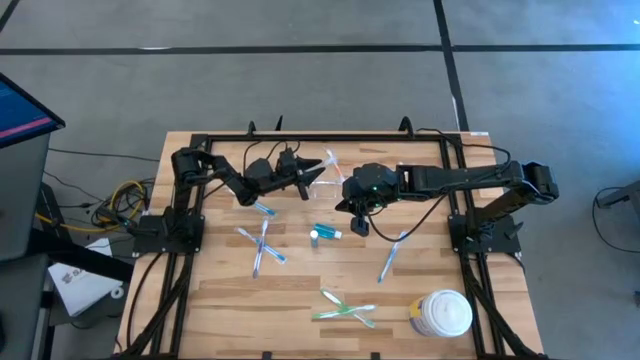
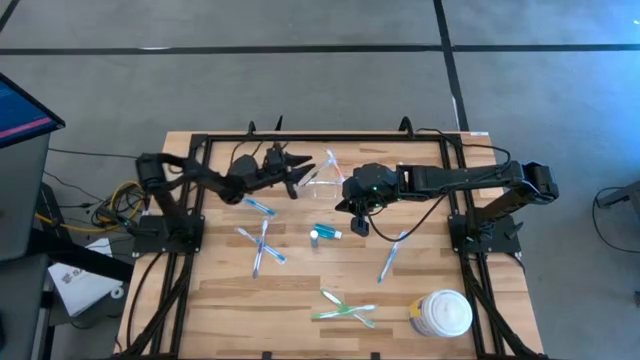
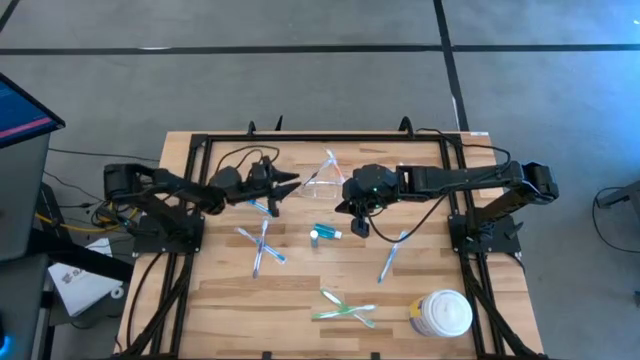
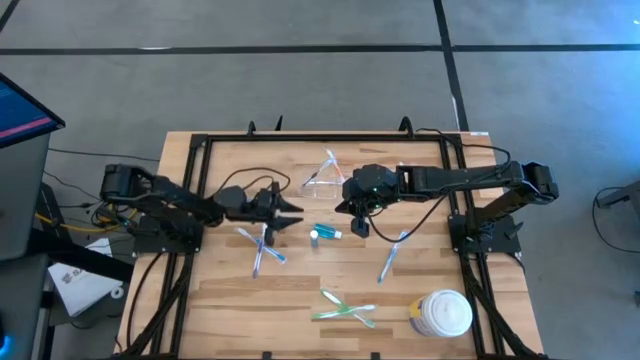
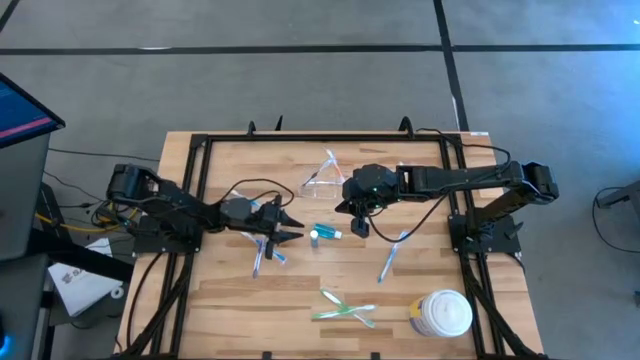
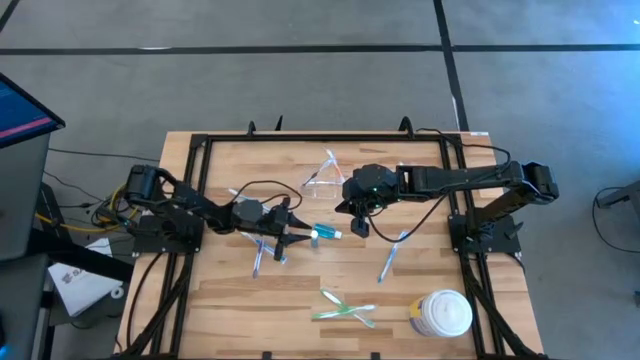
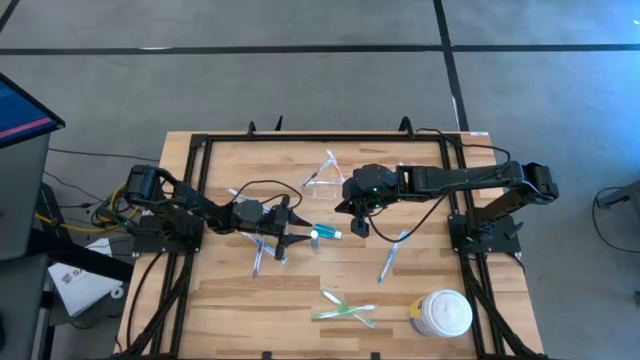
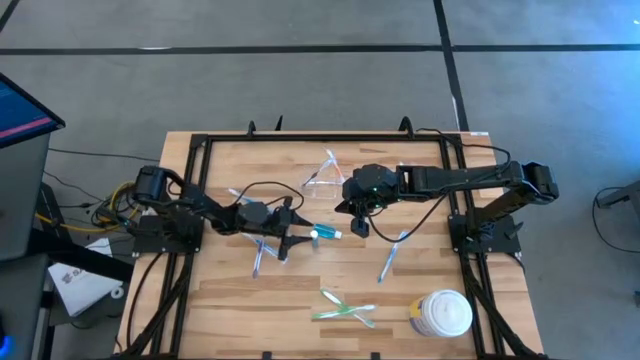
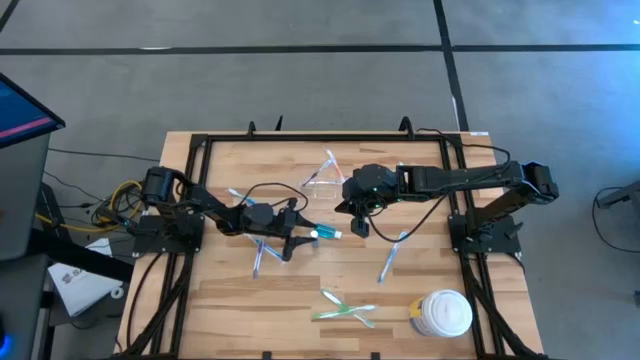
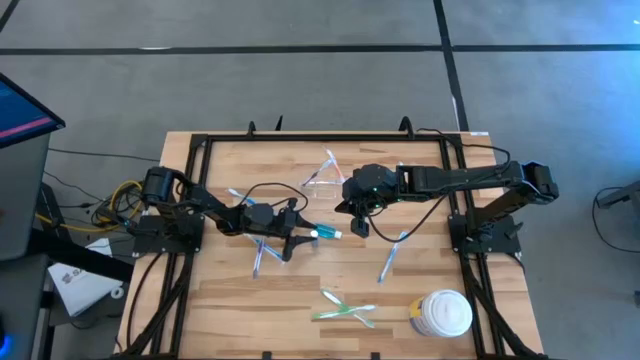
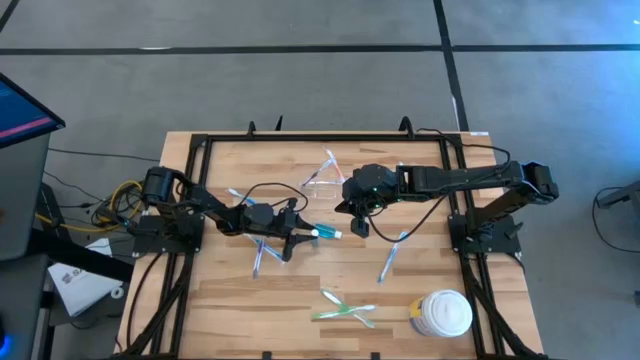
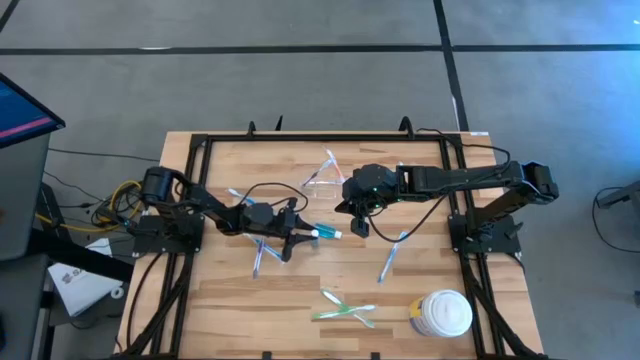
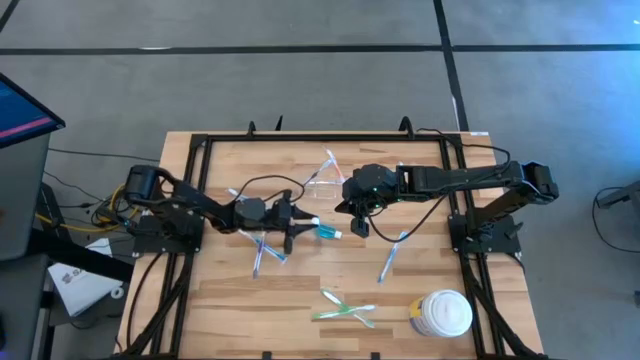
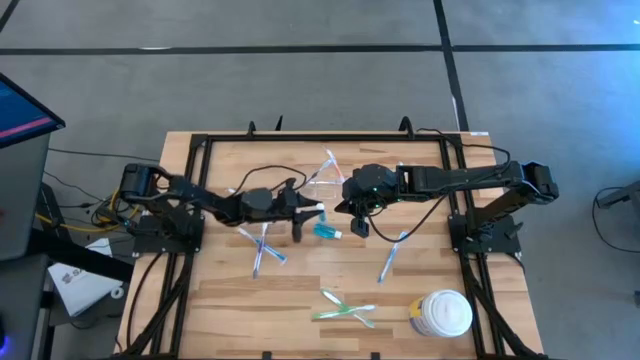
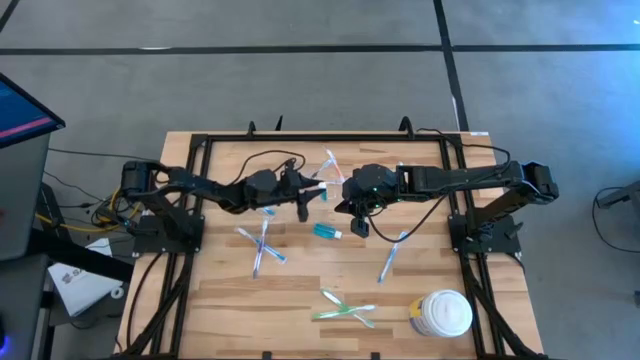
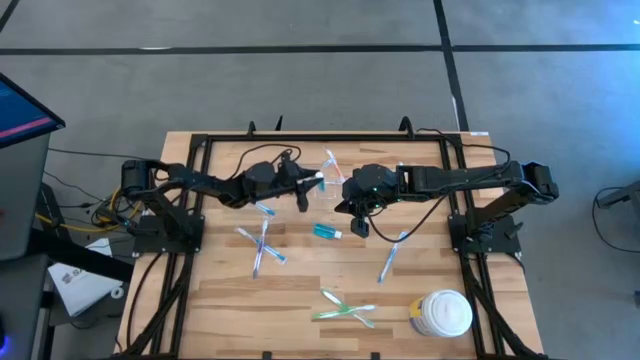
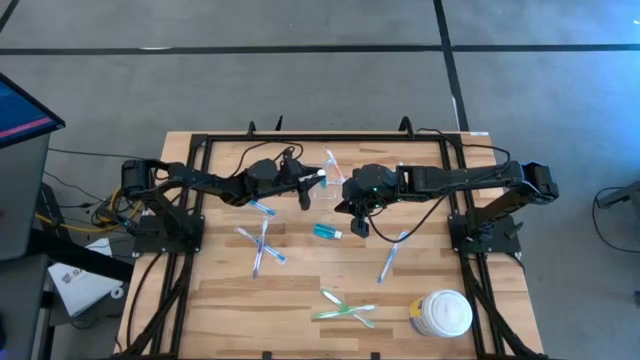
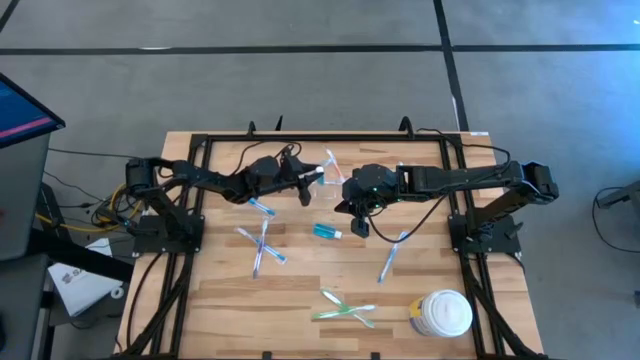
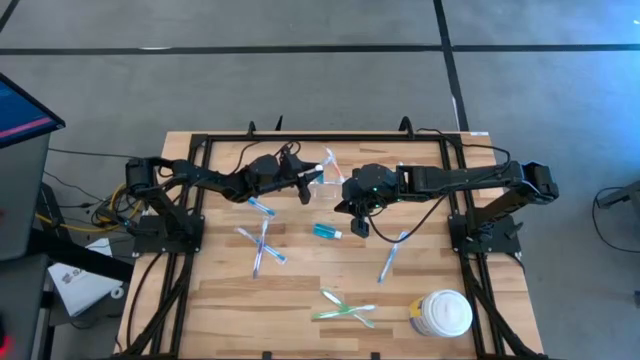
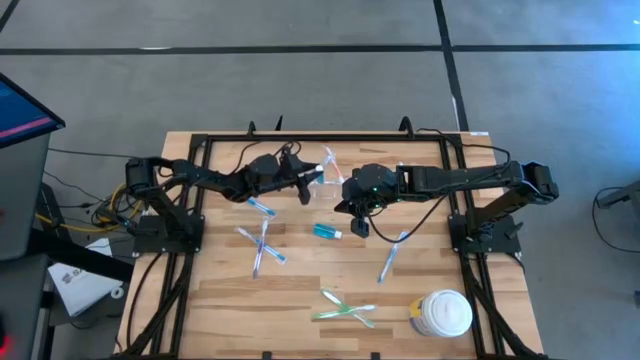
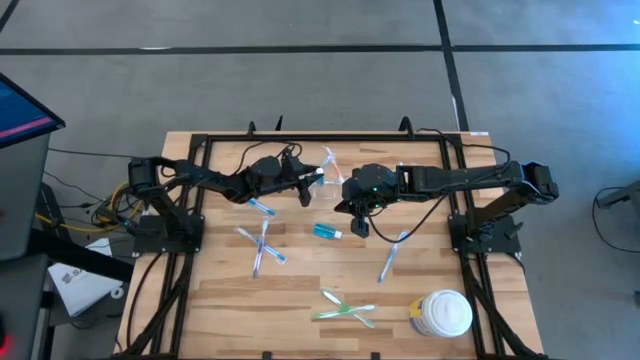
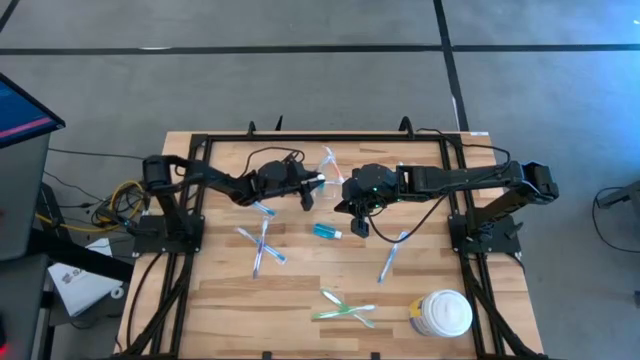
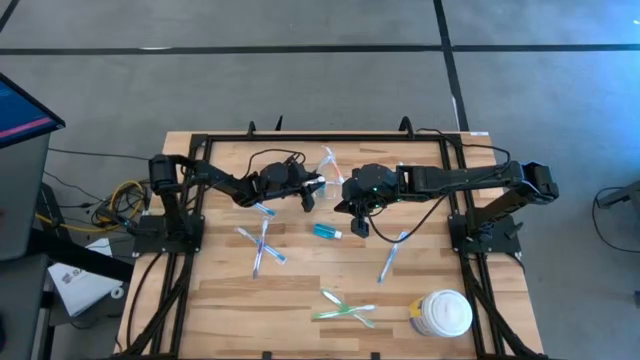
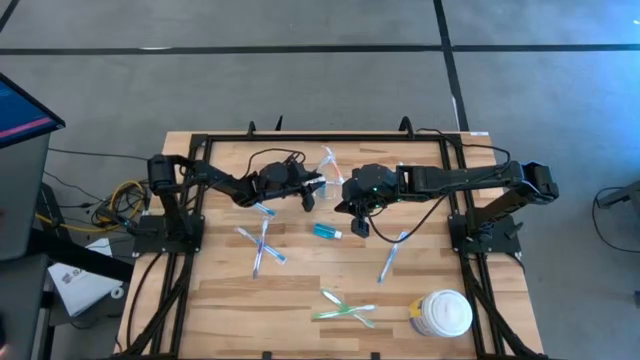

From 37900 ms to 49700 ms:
Task: Pick & Place toothbrushing station
Put the bottom blue mouthwash into the transparent organizer
